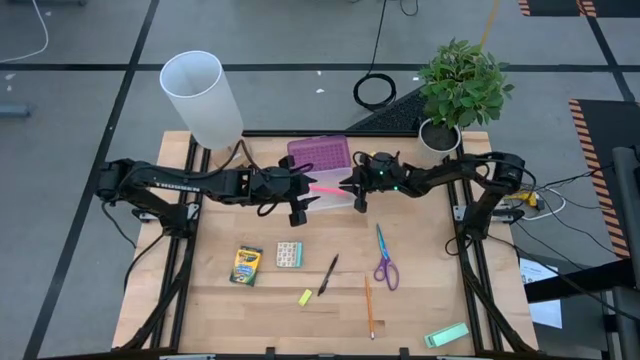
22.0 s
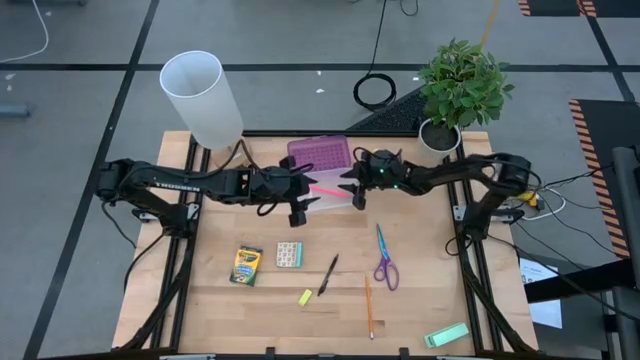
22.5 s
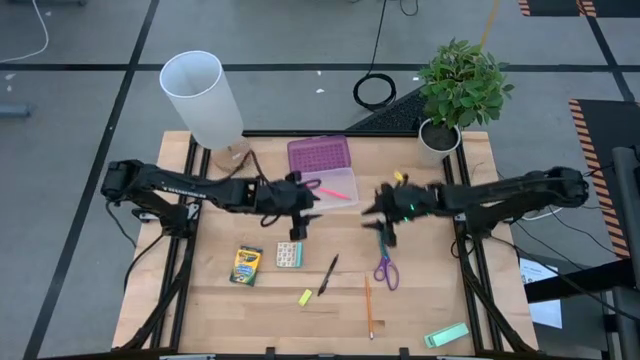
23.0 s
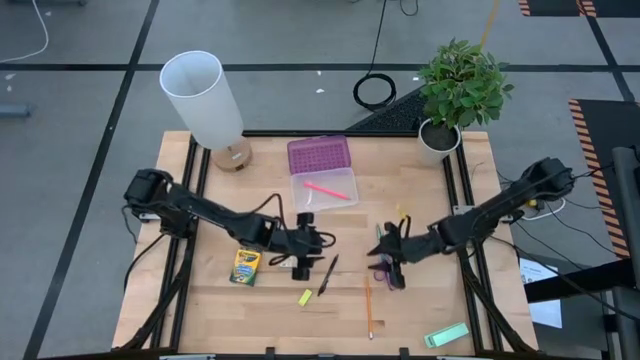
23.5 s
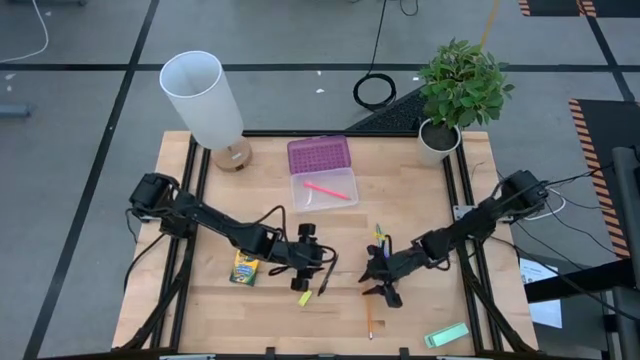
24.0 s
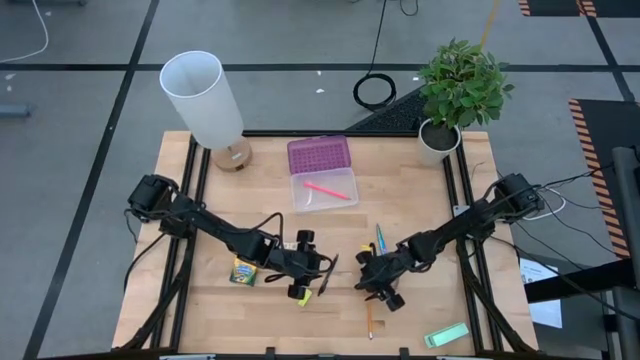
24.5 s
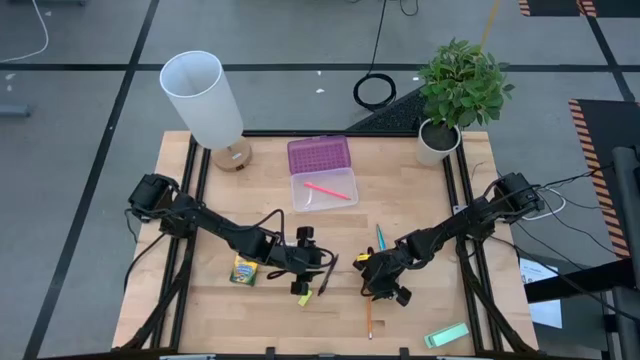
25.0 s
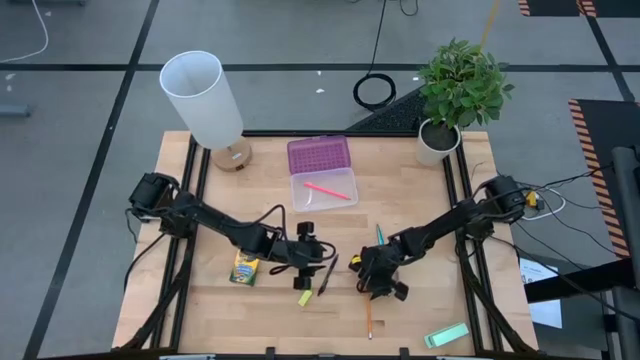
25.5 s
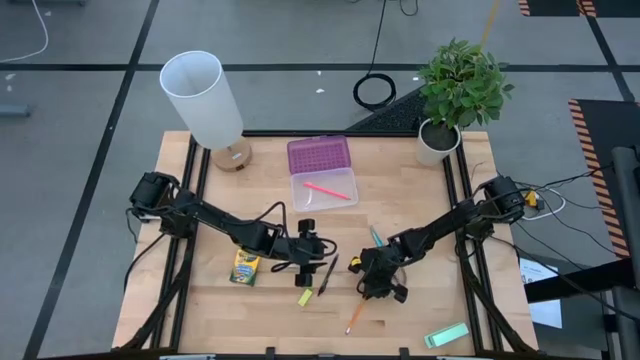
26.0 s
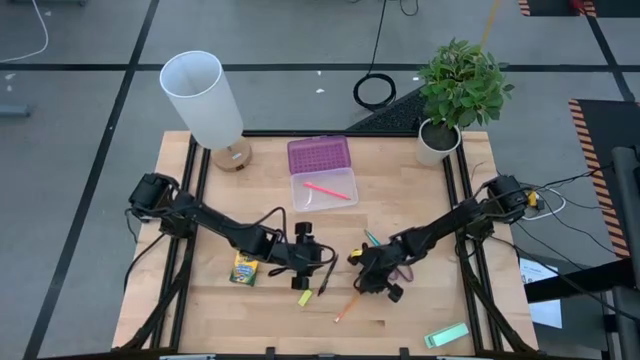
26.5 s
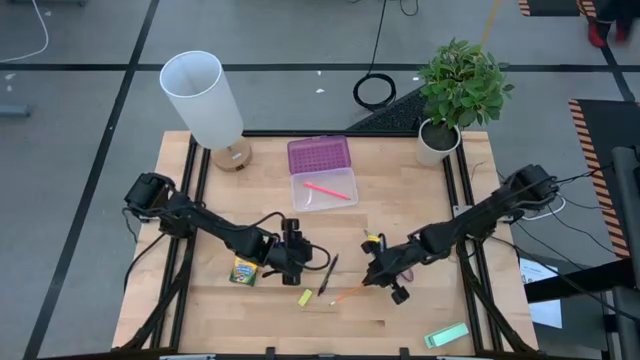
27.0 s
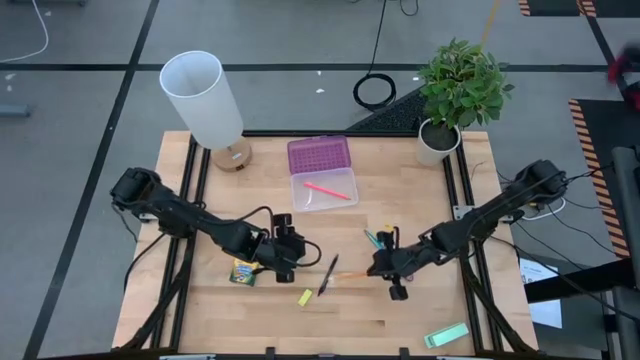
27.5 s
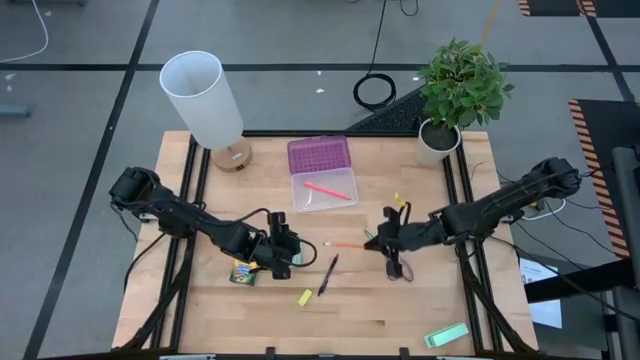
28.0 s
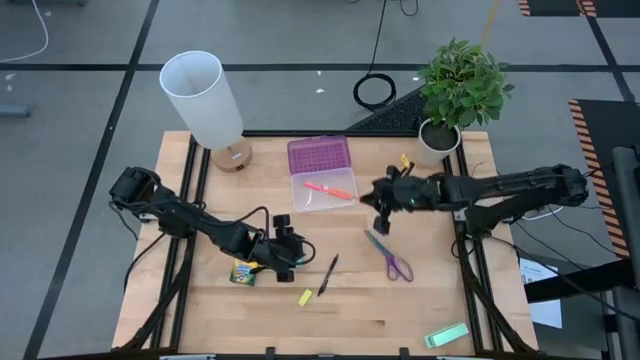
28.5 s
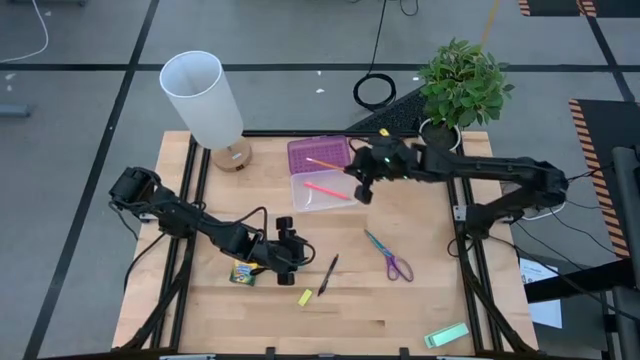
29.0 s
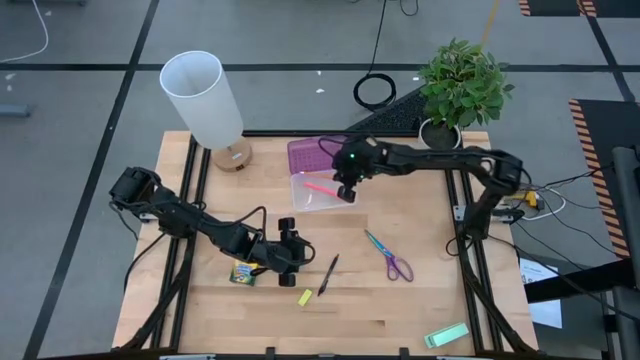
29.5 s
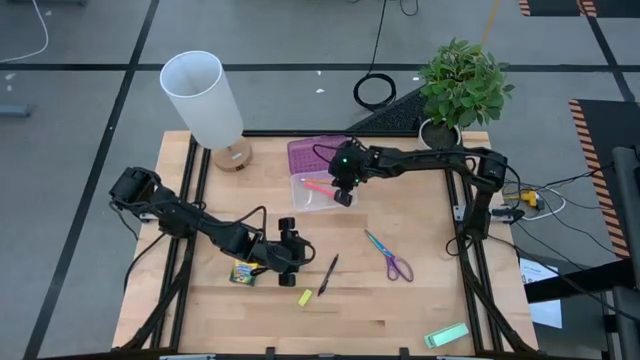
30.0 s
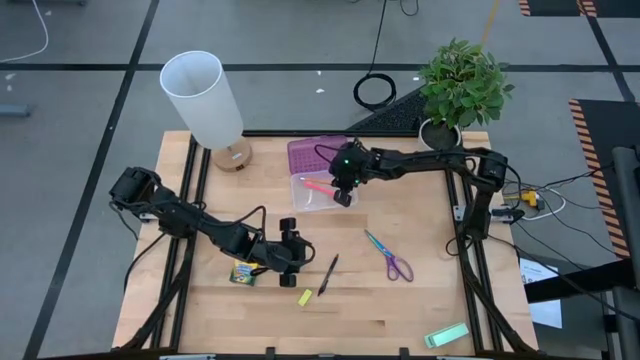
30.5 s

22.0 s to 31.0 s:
Task: Pack school essentials
Put the orange pencil into the purple supply box

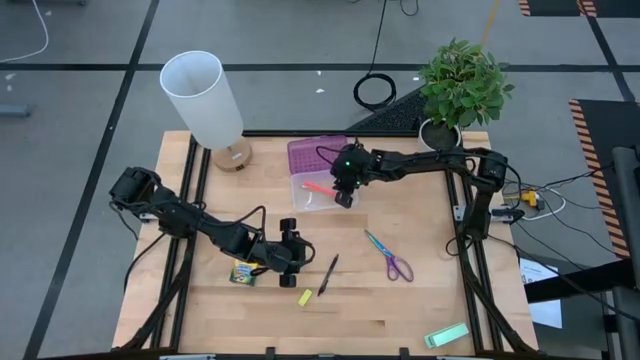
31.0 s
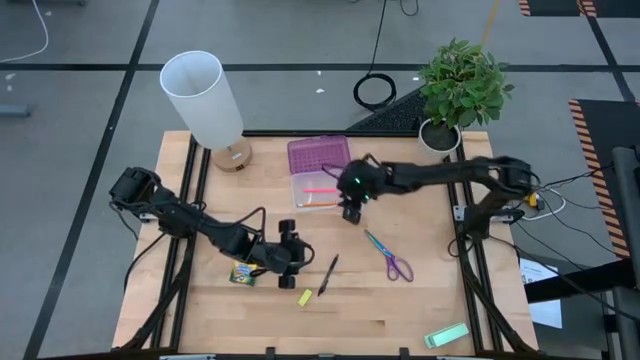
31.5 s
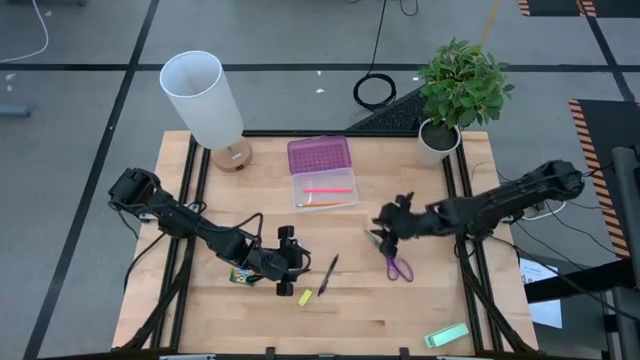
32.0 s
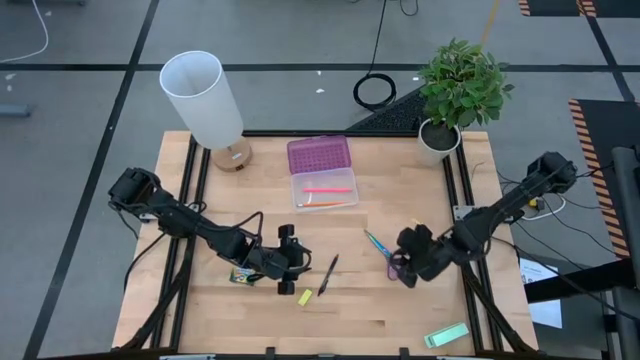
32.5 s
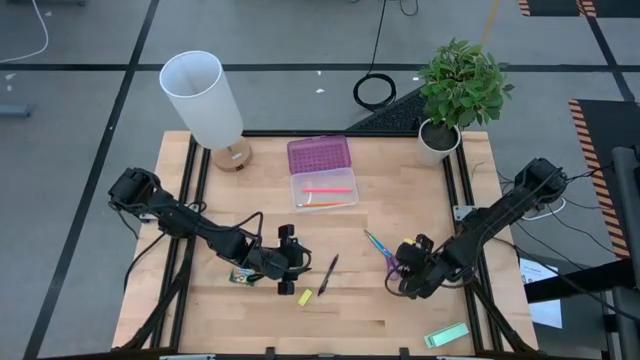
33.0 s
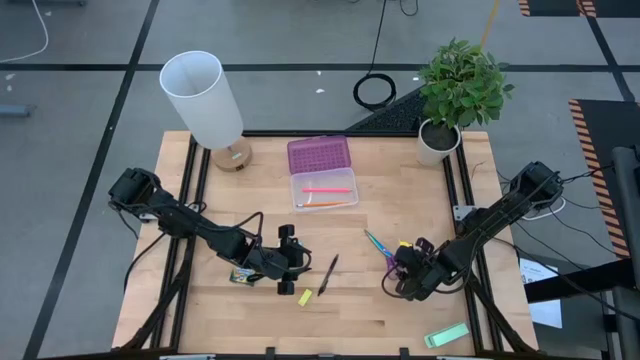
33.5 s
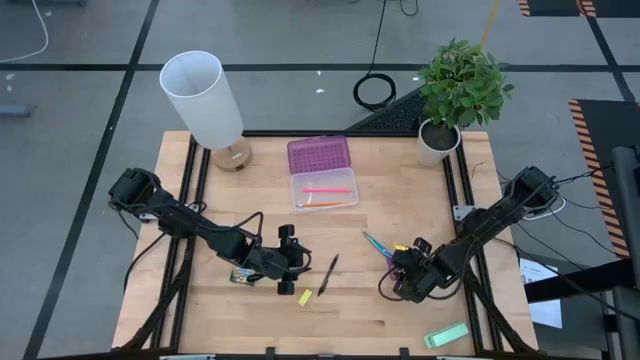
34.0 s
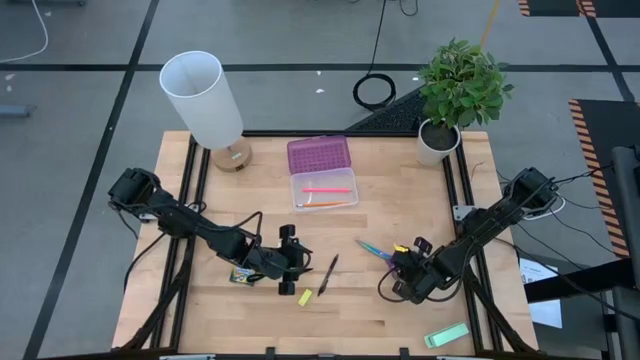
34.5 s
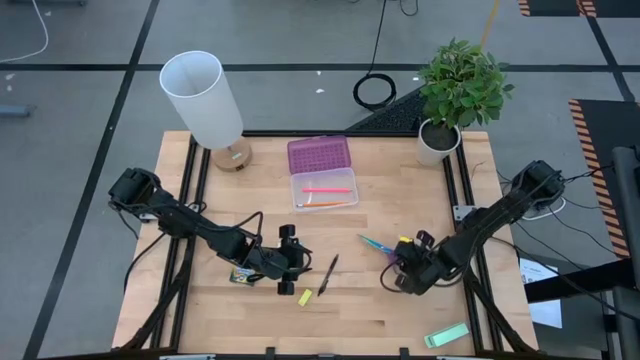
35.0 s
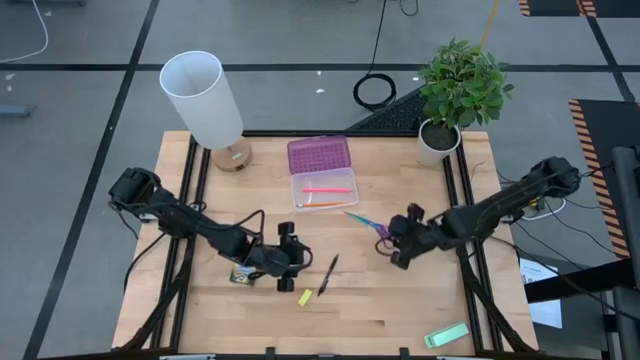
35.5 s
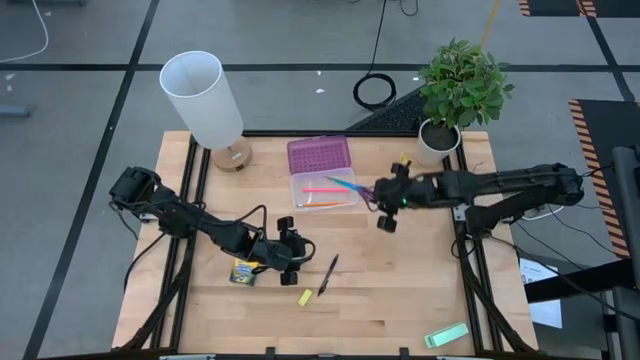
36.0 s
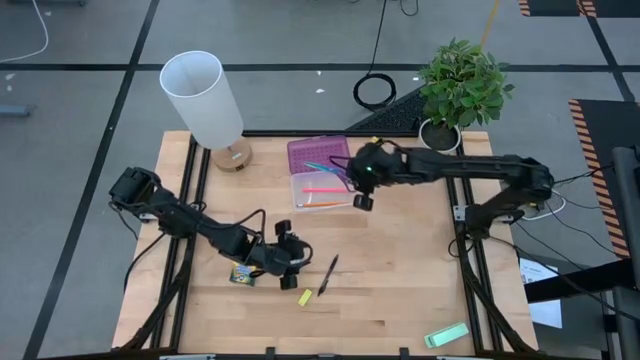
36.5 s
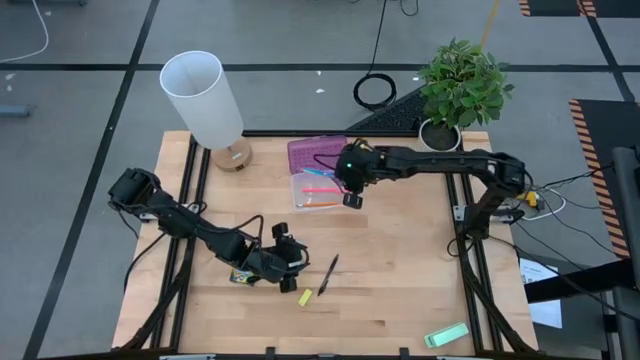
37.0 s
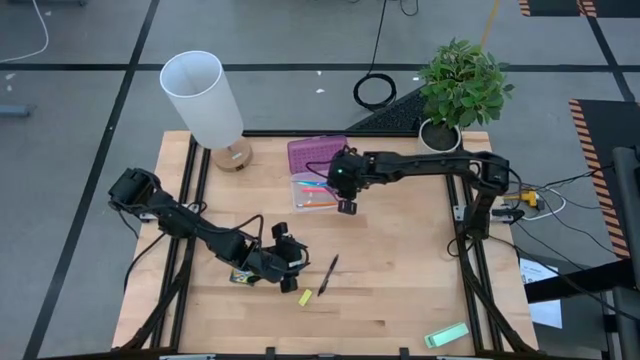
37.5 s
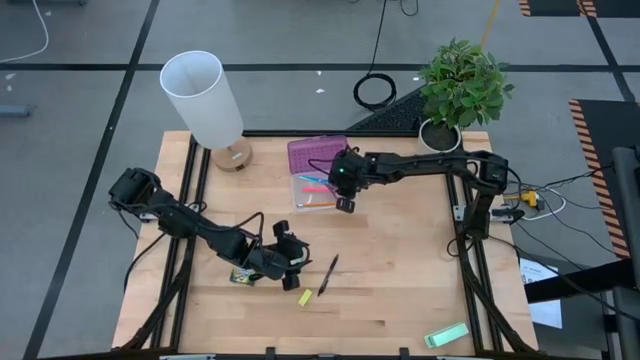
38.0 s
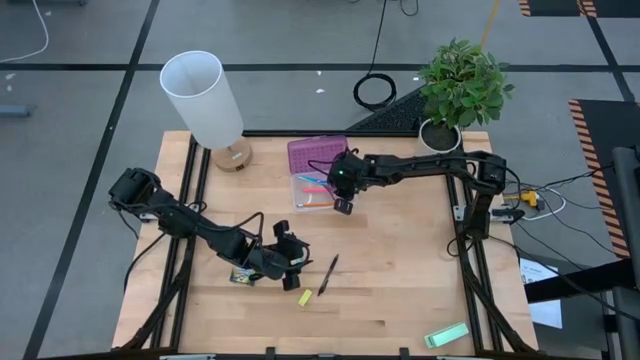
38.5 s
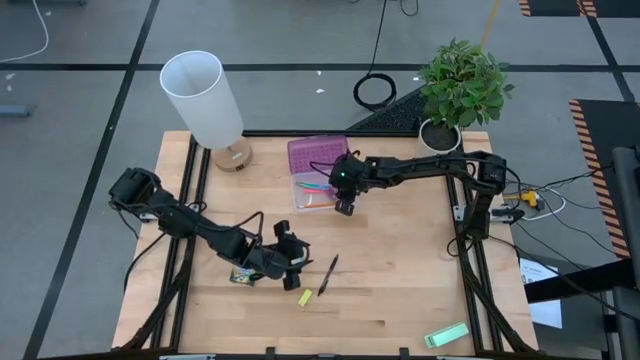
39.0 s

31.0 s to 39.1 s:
Put the purple scissors into the purple supply box

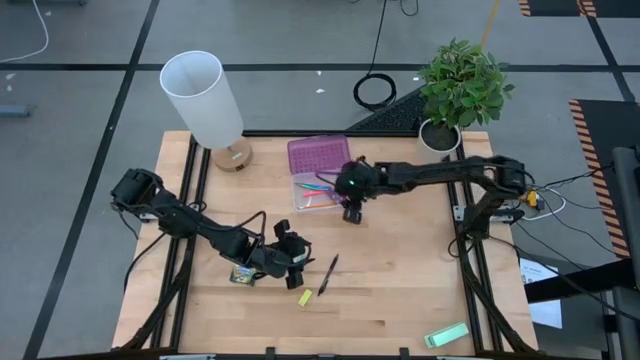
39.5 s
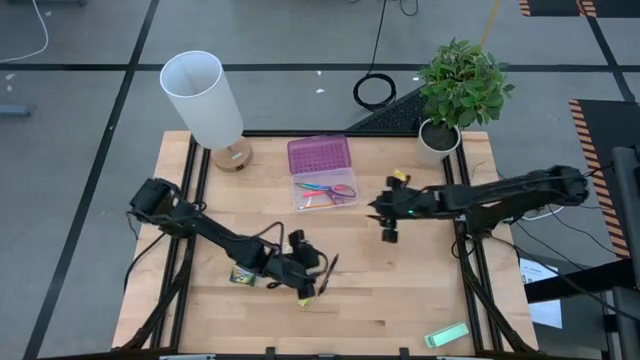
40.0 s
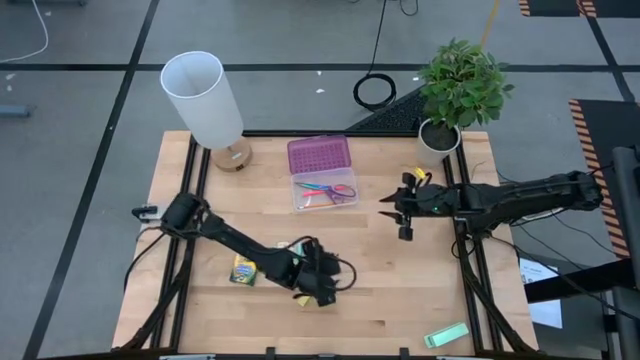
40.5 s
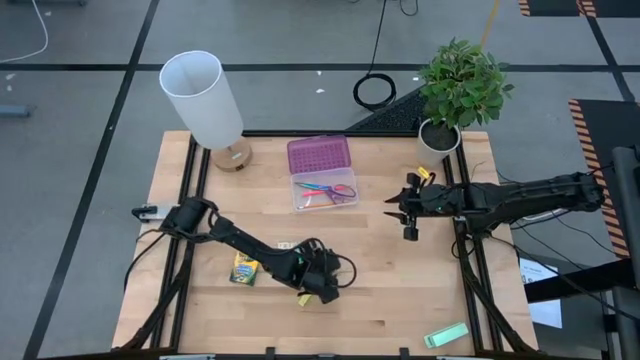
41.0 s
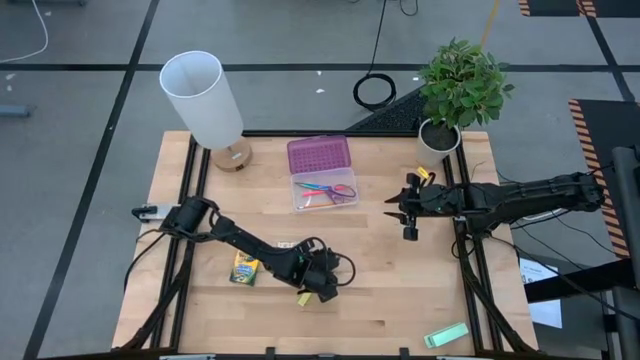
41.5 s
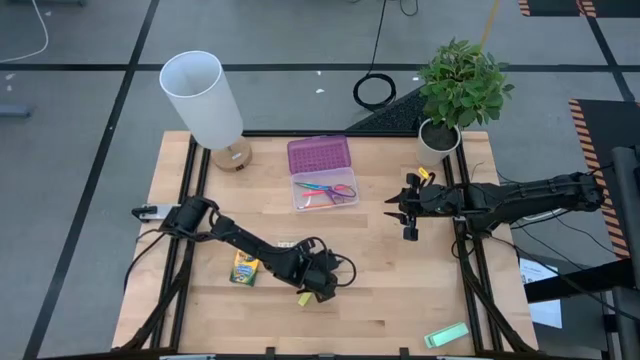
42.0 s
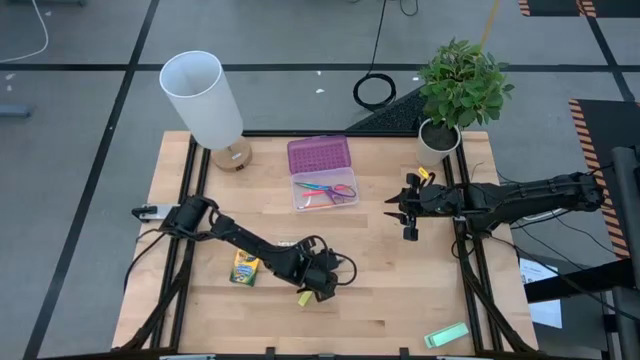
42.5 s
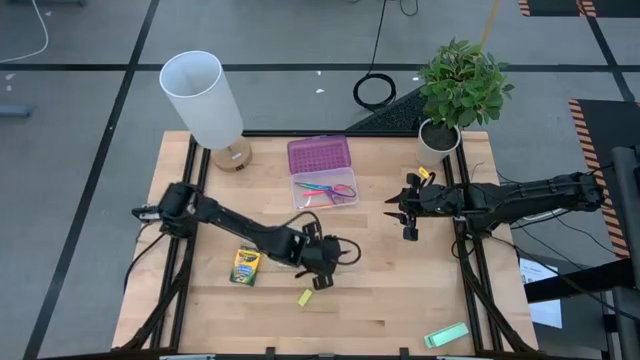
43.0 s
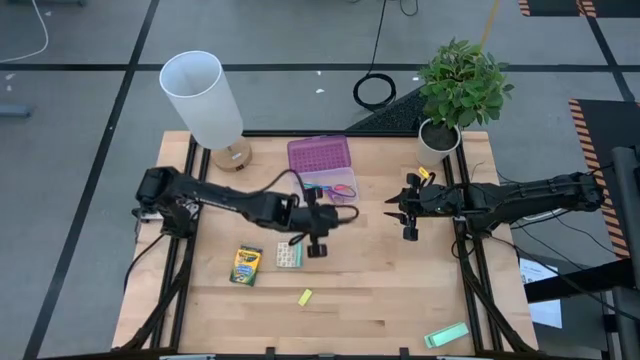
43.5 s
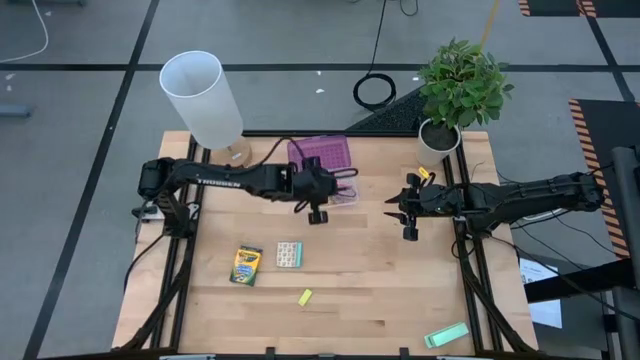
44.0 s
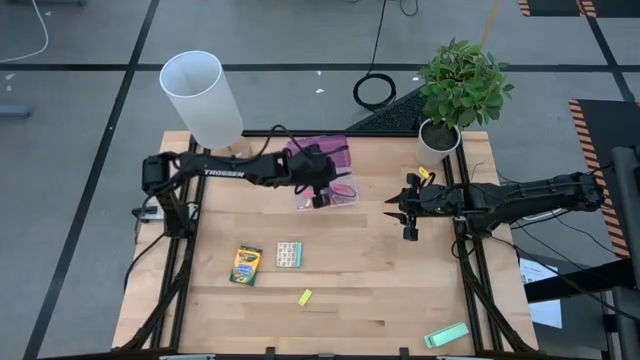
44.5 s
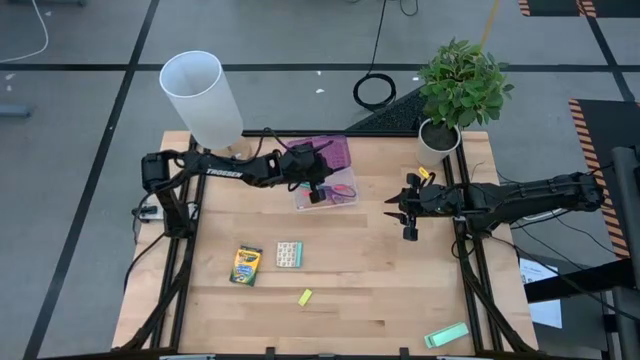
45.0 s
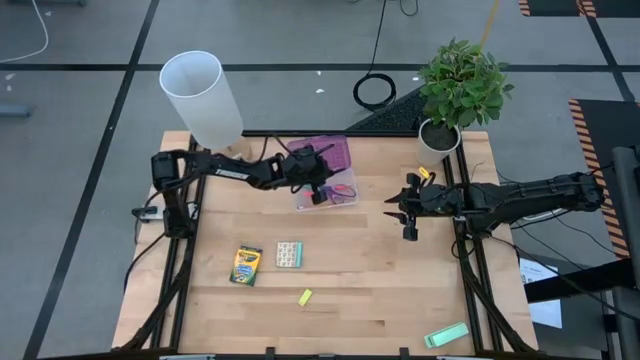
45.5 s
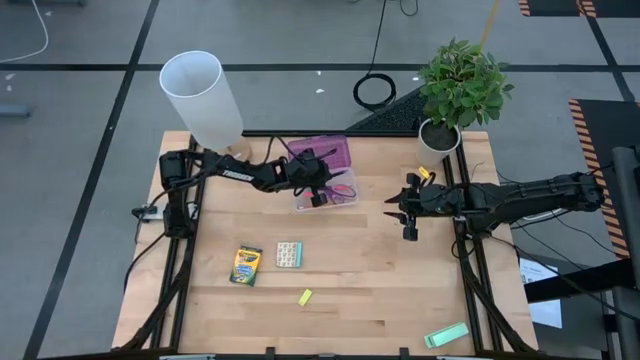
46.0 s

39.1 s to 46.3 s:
Put the black pen into the purple supply box
